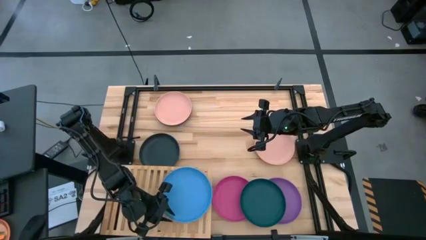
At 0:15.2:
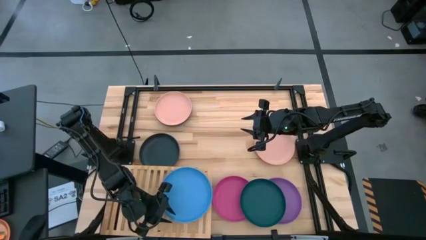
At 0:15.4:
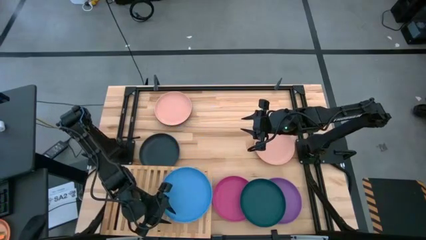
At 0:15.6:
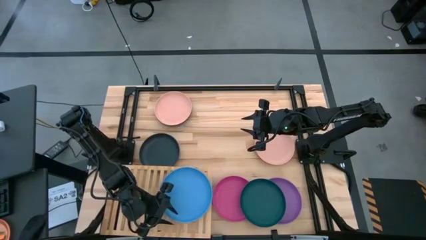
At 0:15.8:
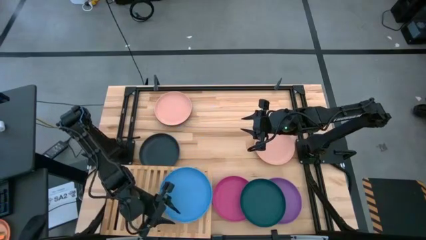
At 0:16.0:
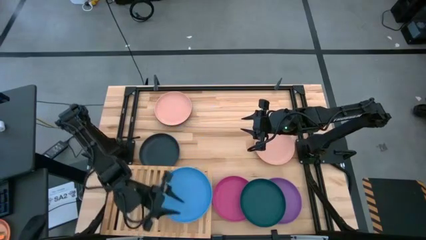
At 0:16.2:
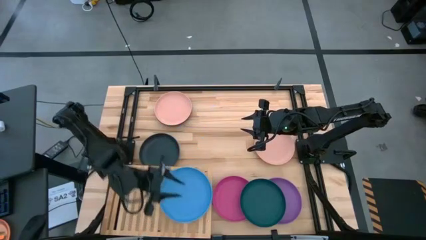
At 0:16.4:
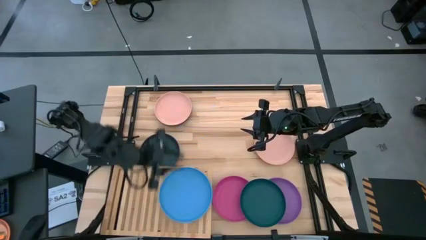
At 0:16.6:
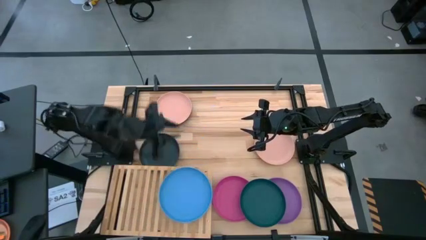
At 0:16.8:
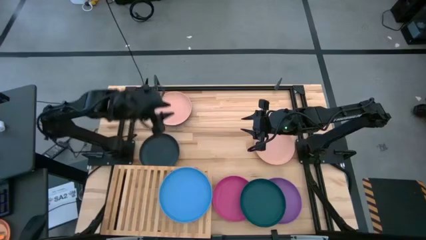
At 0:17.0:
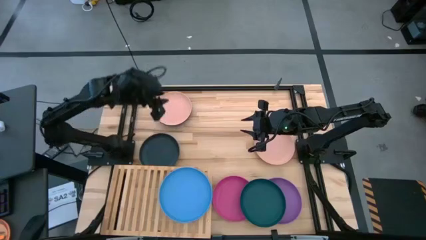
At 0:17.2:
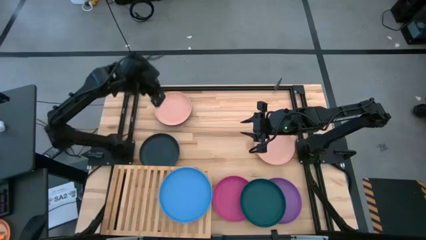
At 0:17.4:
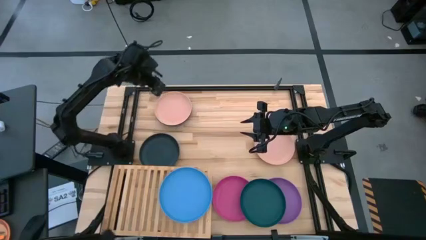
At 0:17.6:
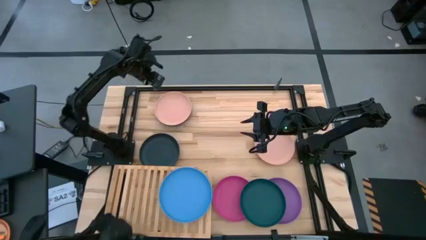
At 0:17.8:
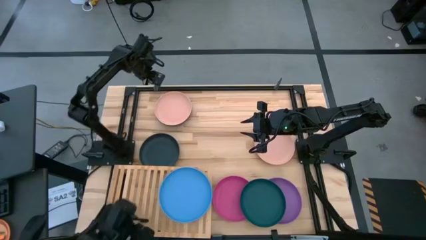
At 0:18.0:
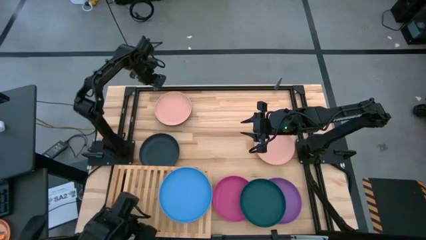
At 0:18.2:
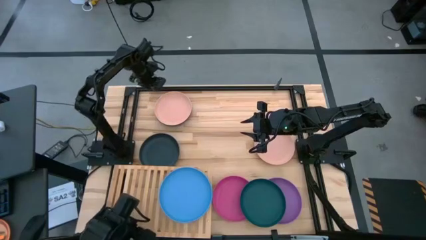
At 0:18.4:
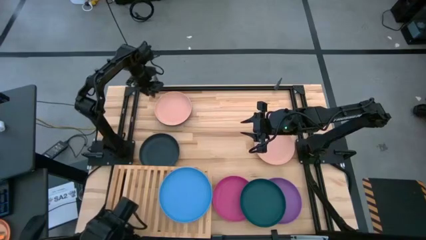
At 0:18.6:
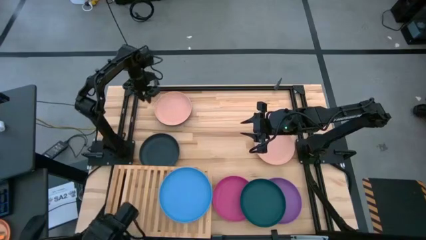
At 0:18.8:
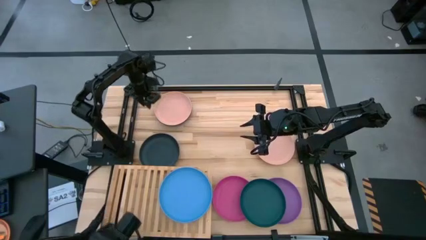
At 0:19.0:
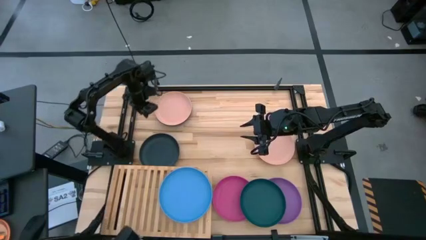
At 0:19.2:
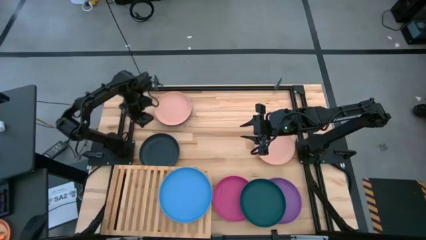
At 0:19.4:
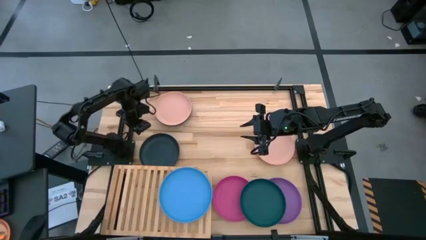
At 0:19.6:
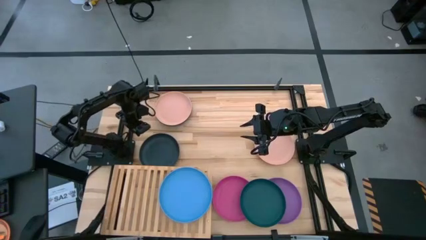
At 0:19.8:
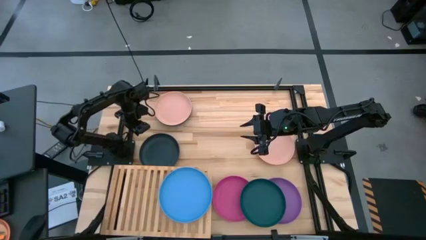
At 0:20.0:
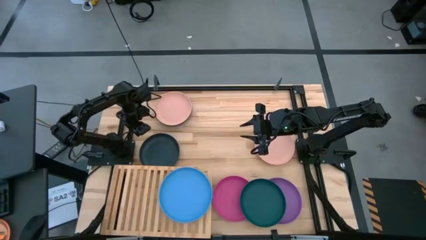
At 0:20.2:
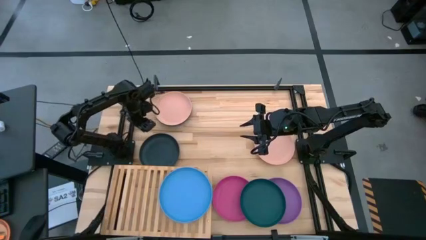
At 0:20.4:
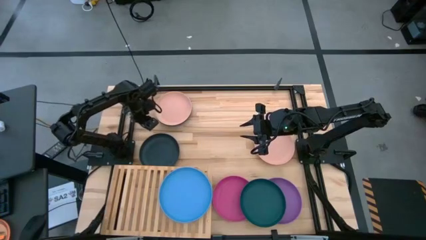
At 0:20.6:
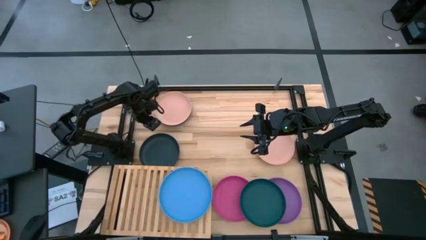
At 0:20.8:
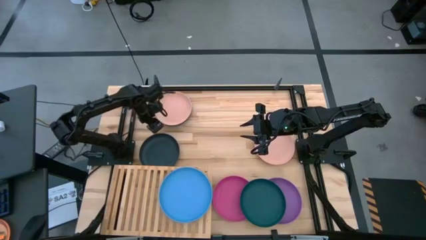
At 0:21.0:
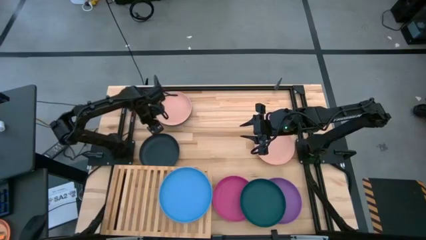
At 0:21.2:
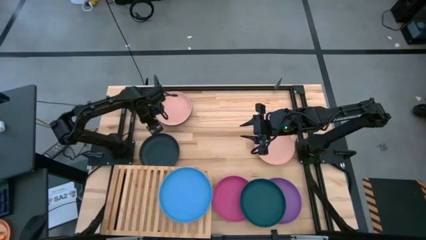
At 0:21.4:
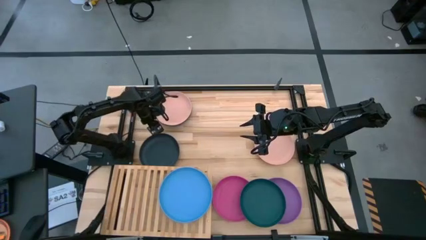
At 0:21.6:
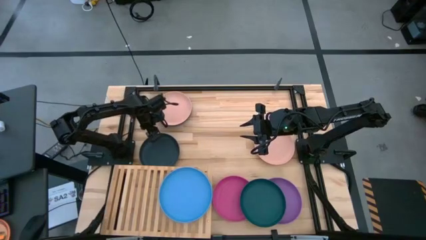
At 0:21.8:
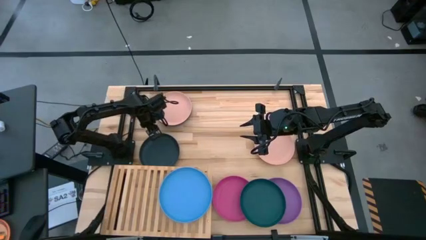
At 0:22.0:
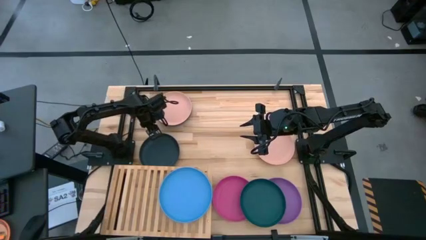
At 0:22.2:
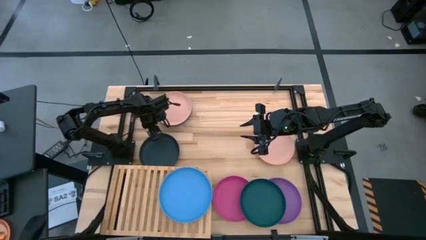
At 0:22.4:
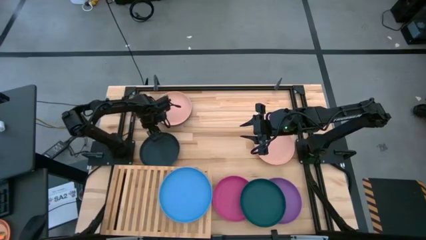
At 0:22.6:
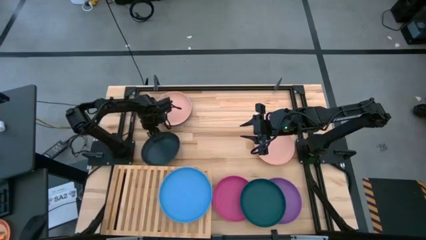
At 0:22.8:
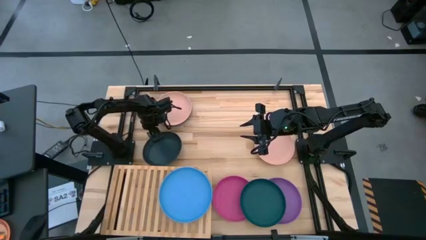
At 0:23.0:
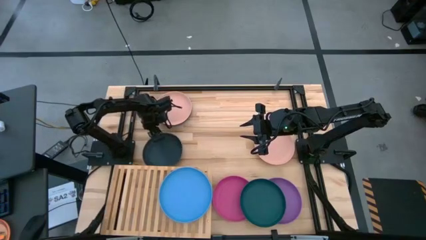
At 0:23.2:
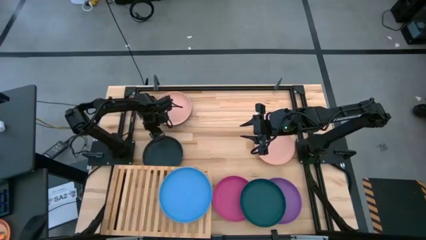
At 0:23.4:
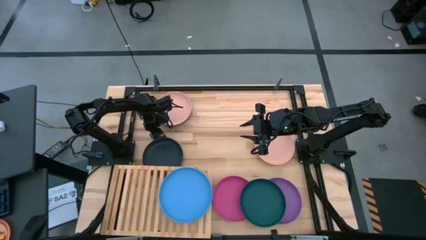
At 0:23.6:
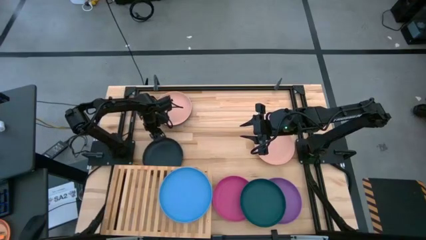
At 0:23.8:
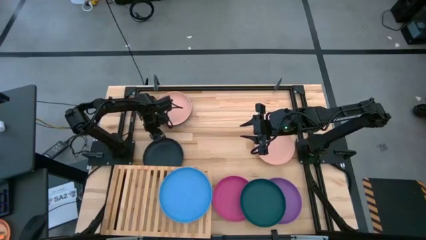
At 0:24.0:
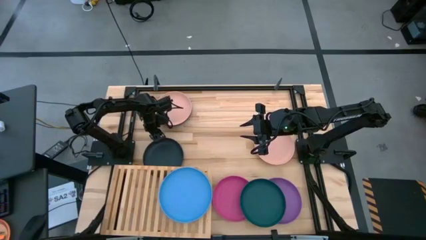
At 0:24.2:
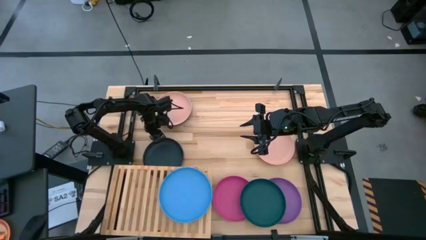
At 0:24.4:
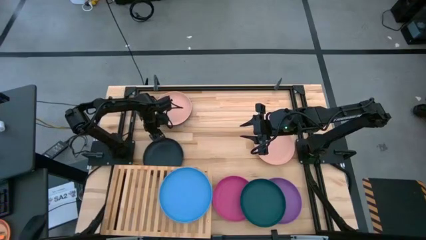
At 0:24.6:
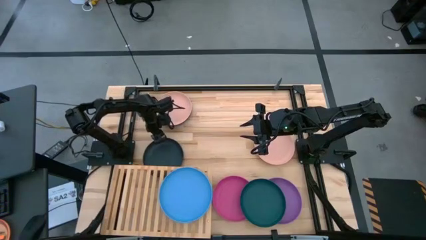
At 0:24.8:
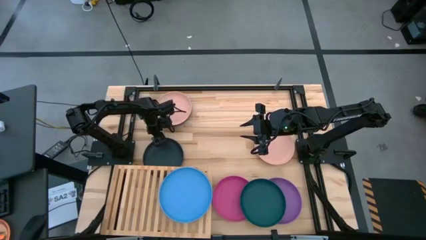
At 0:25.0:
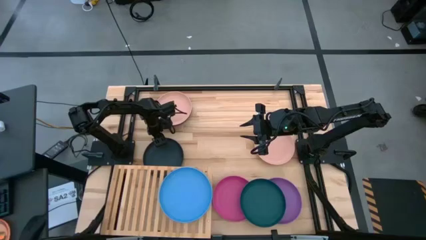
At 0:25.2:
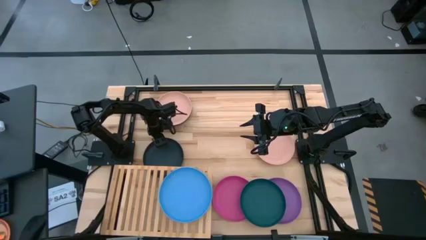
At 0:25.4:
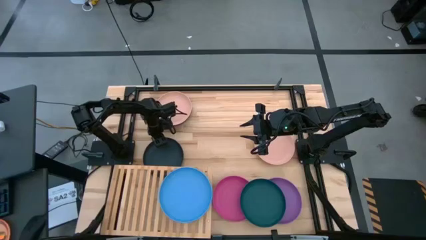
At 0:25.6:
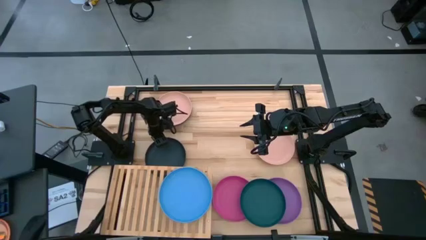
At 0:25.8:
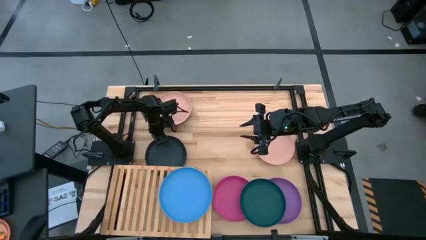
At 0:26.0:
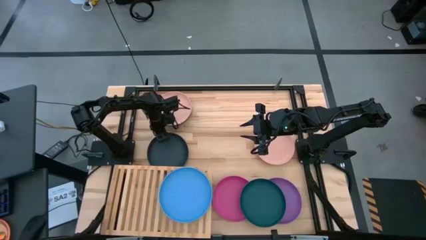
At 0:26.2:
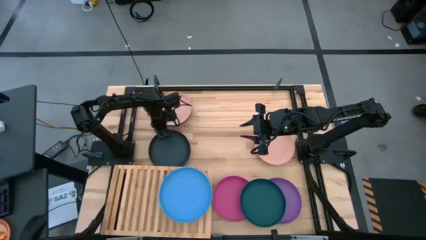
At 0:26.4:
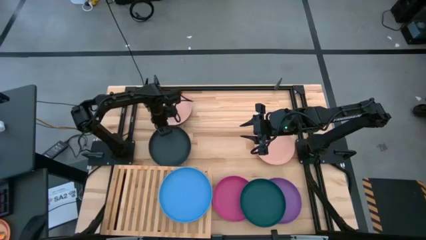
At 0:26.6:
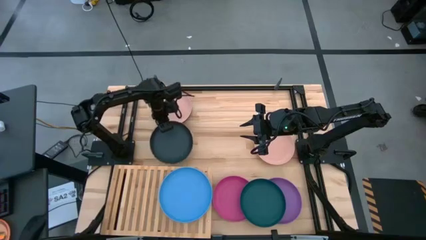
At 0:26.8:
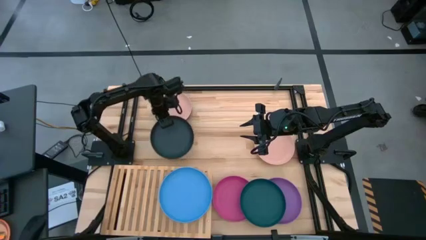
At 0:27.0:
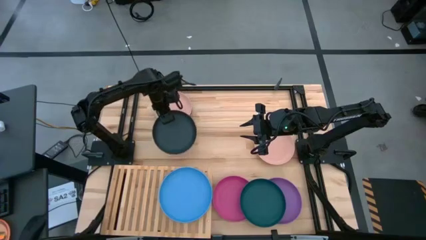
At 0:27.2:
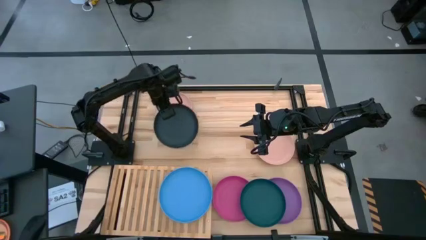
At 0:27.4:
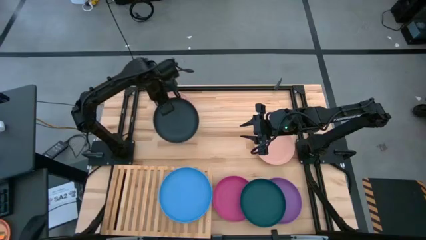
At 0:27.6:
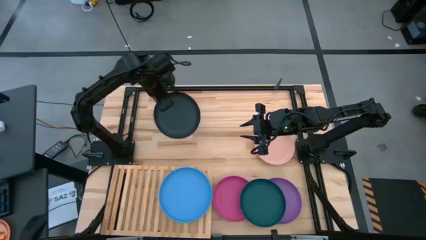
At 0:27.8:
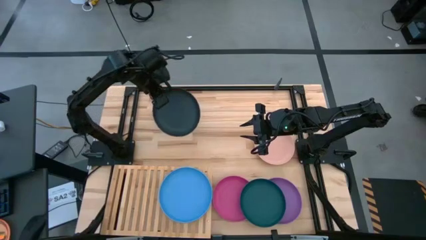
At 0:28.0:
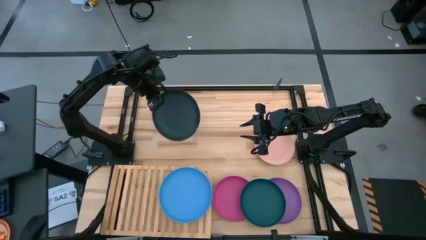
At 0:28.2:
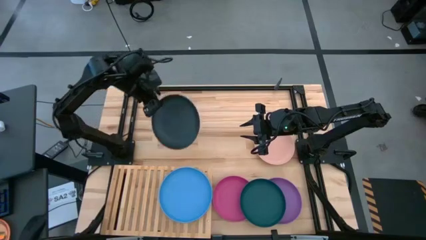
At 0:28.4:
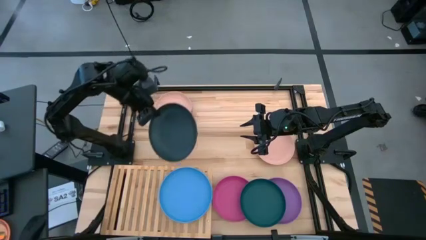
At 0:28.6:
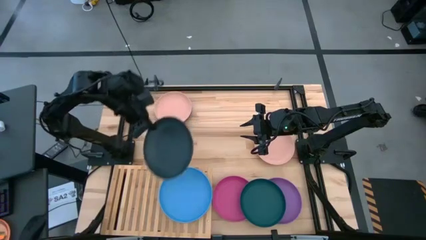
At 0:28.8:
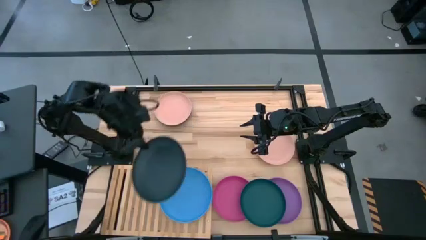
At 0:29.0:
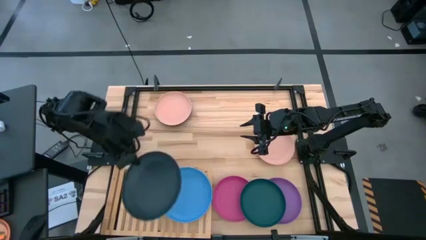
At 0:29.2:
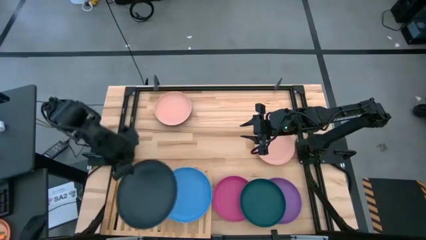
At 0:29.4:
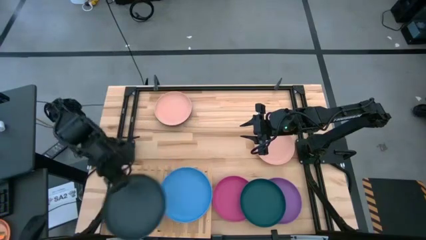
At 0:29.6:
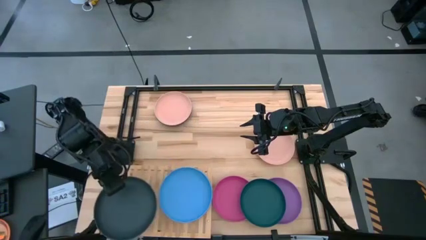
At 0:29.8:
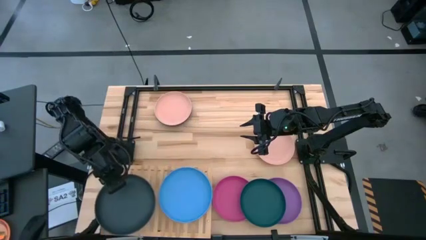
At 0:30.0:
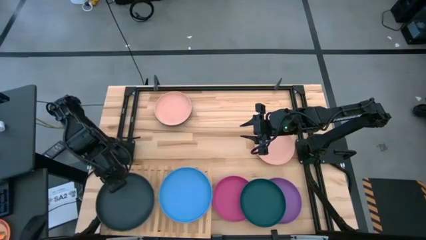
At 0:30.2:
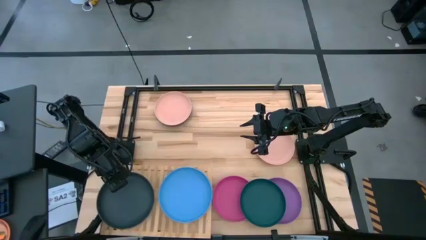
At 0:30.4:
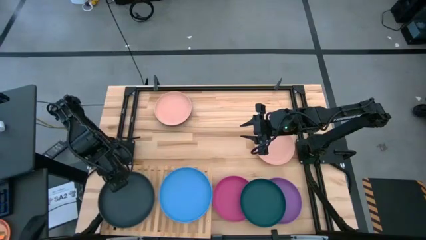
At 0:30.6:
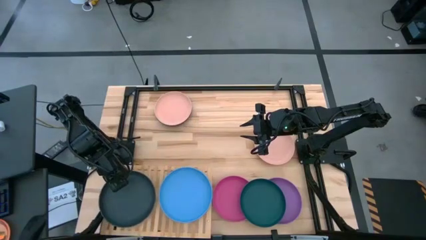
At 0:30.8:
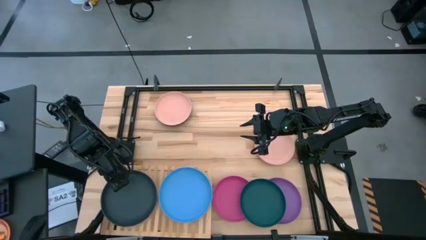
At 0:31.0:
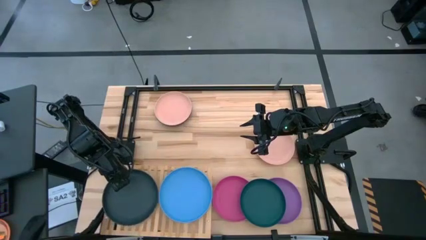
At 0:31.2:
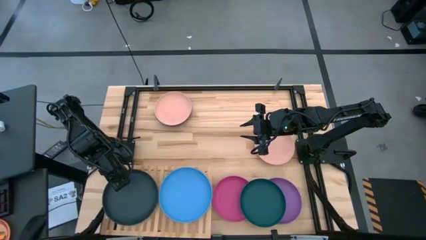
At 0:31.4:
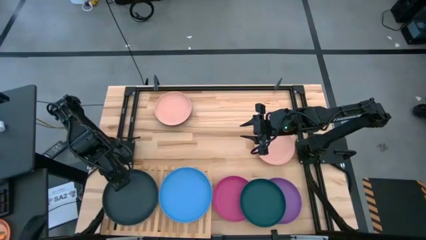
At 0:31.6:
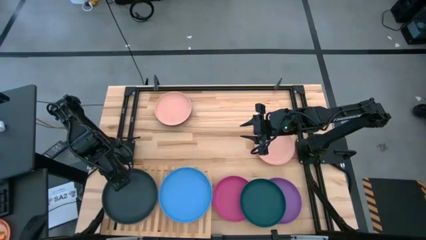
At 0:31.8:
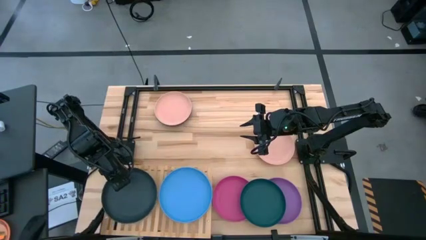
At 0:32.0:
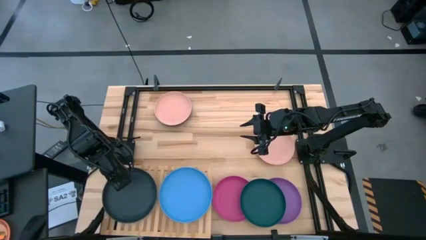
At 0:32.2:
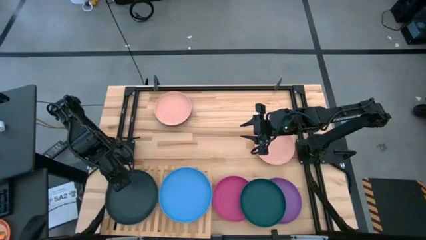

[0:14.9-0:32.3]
Task: Place and stack plates onto a shelf
Put the left dark green plate on the shelf
